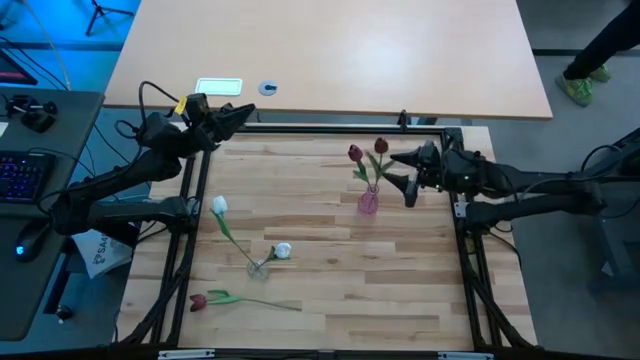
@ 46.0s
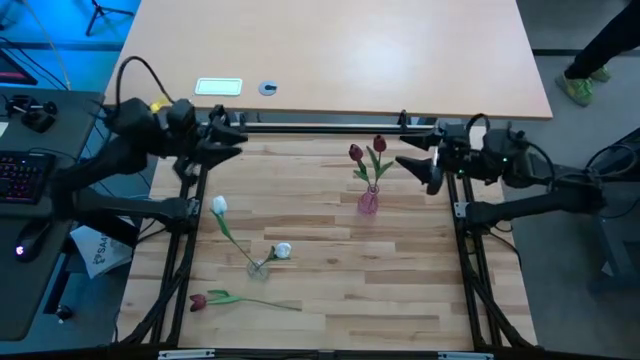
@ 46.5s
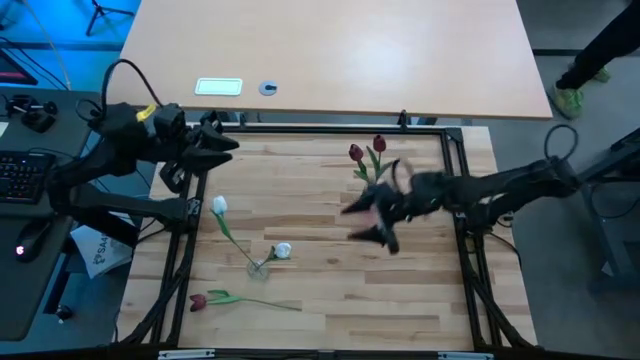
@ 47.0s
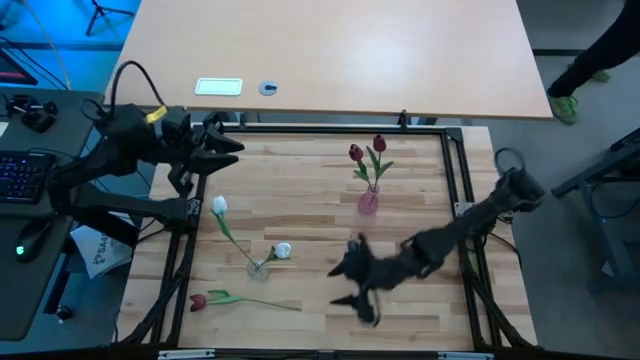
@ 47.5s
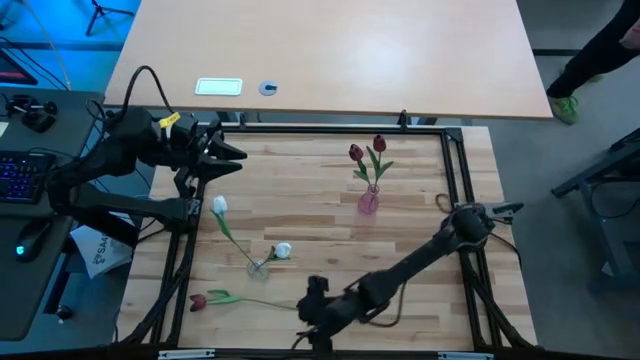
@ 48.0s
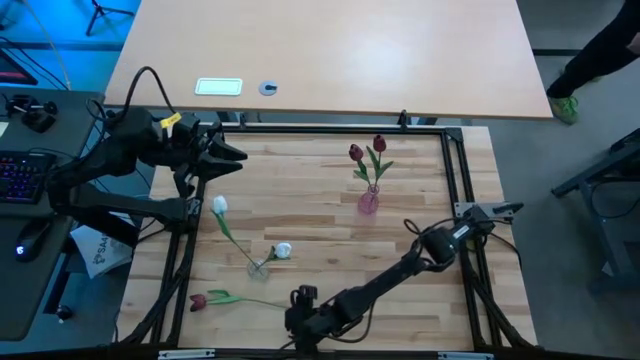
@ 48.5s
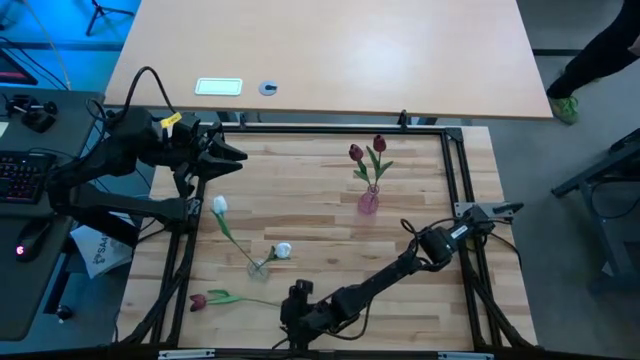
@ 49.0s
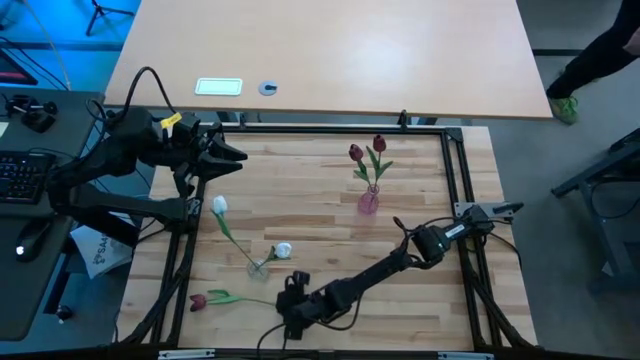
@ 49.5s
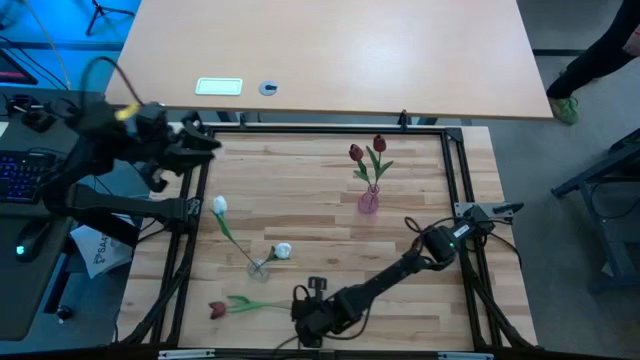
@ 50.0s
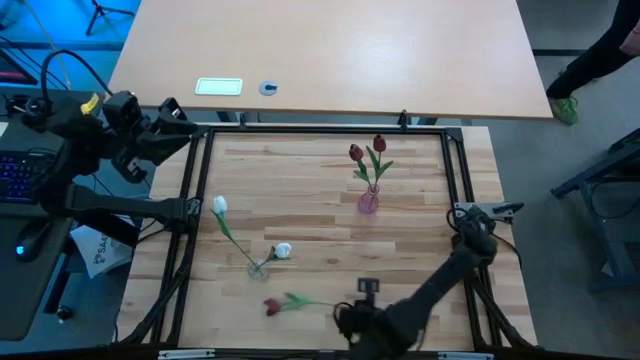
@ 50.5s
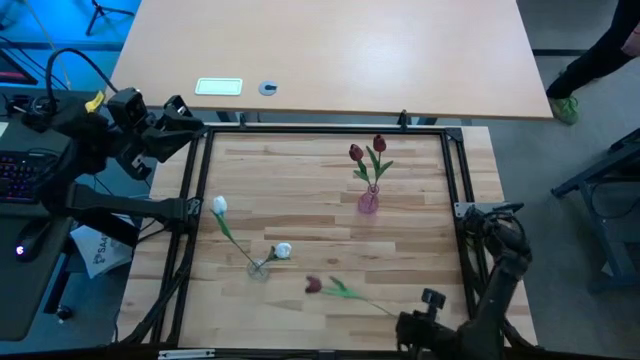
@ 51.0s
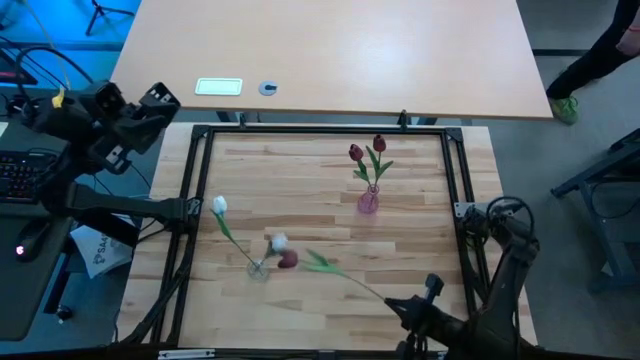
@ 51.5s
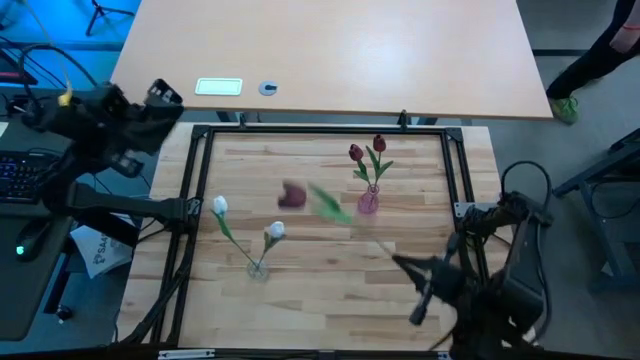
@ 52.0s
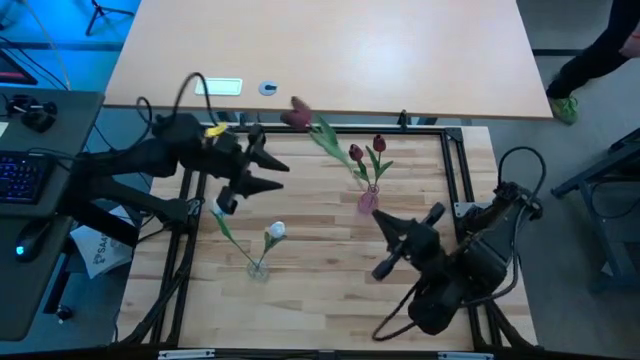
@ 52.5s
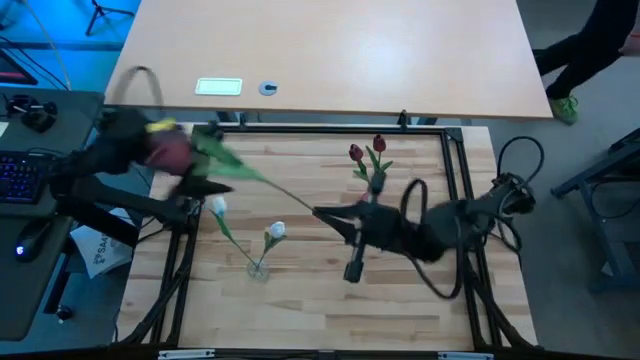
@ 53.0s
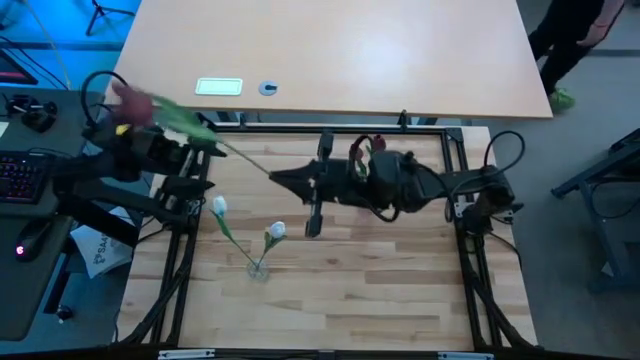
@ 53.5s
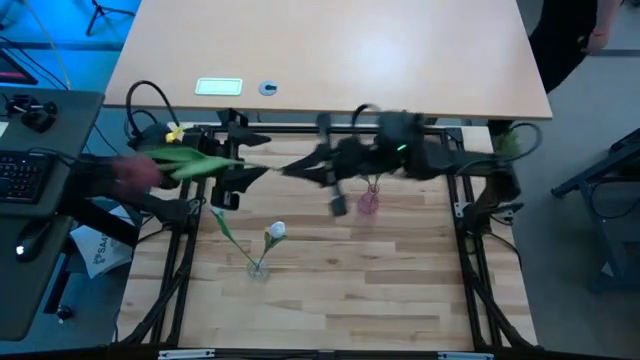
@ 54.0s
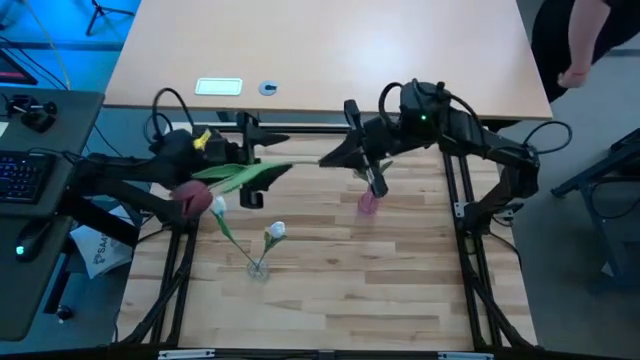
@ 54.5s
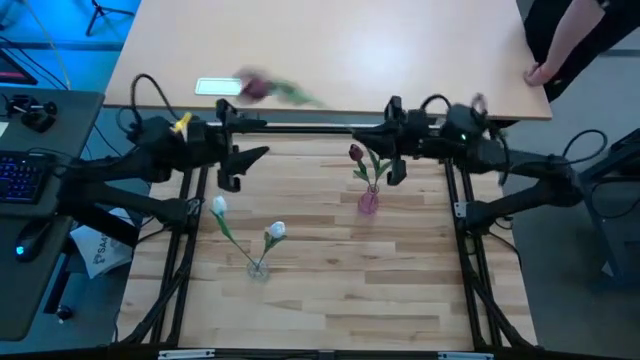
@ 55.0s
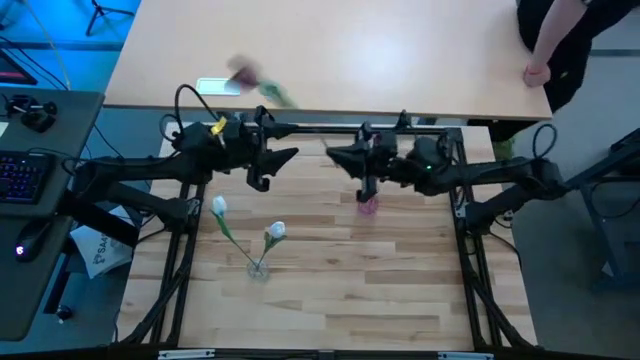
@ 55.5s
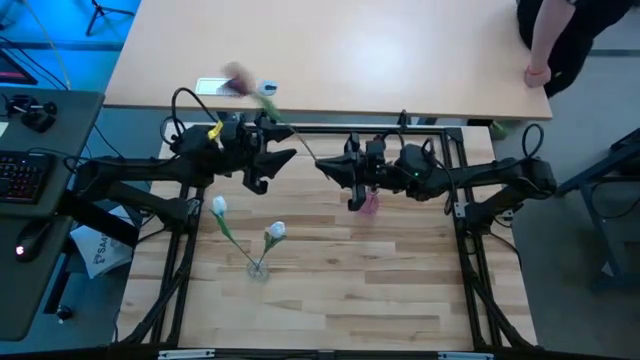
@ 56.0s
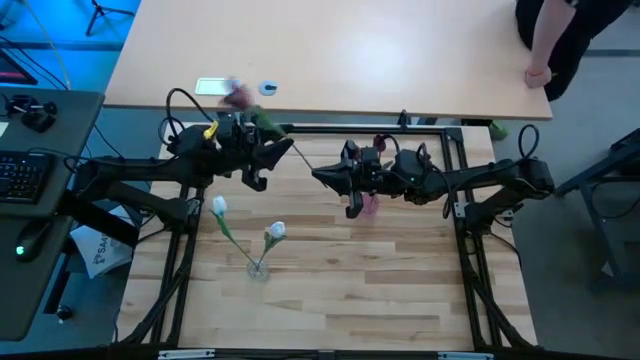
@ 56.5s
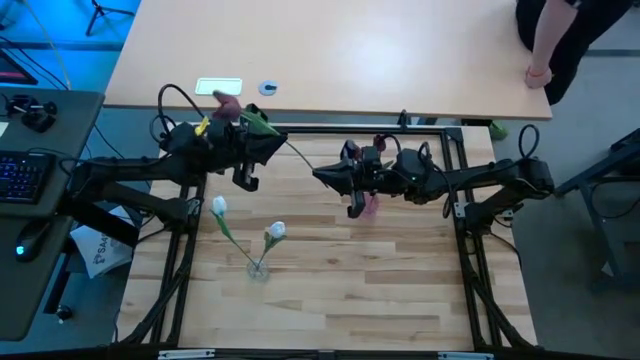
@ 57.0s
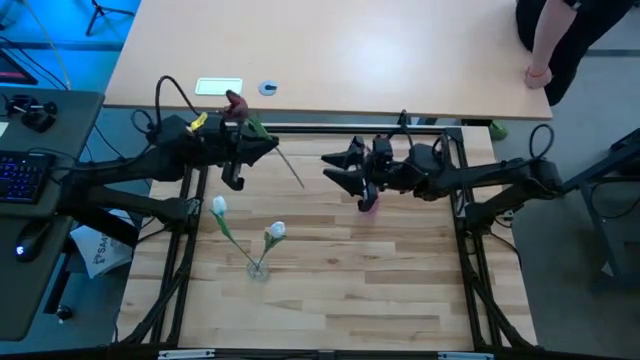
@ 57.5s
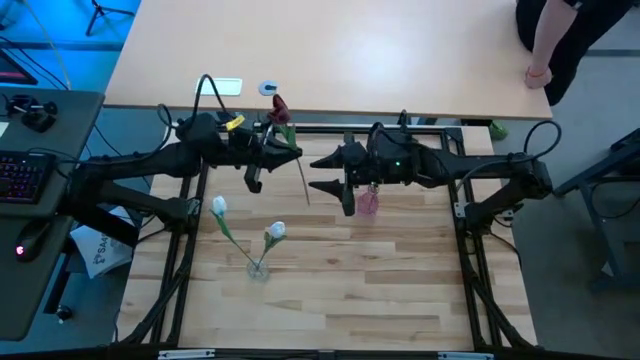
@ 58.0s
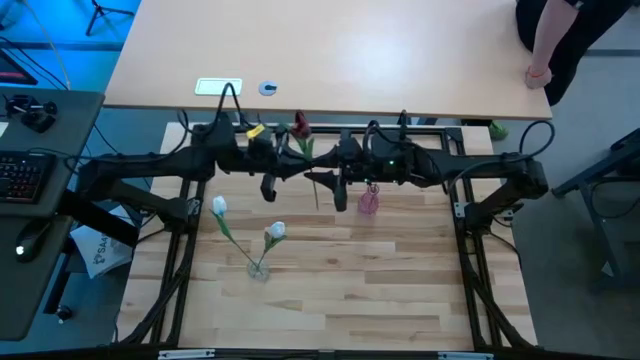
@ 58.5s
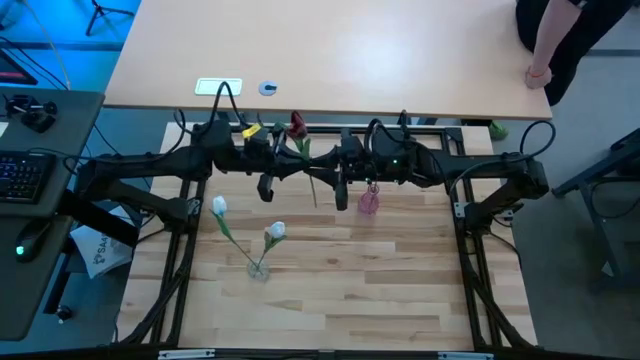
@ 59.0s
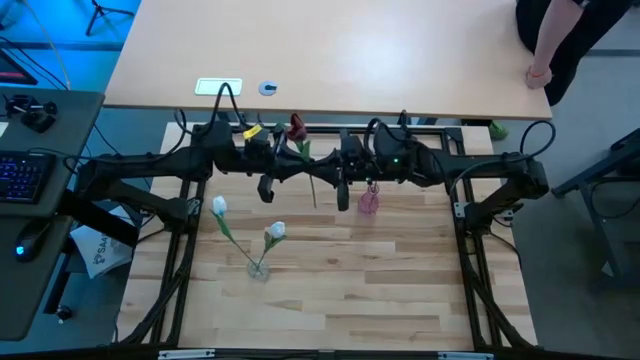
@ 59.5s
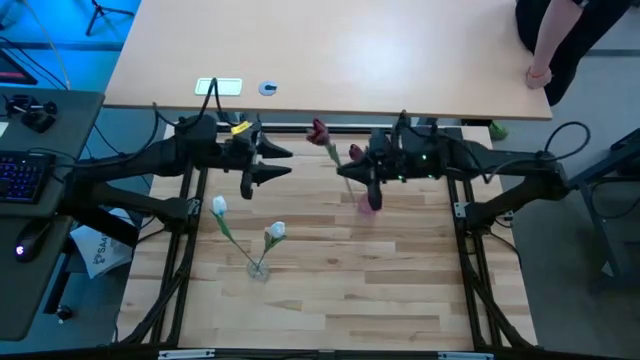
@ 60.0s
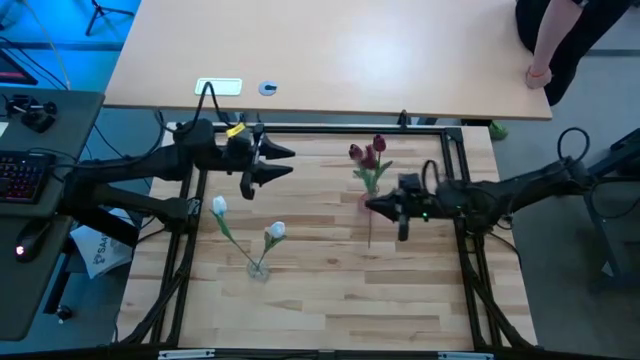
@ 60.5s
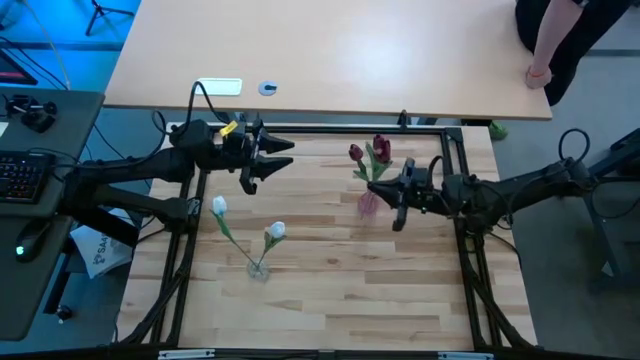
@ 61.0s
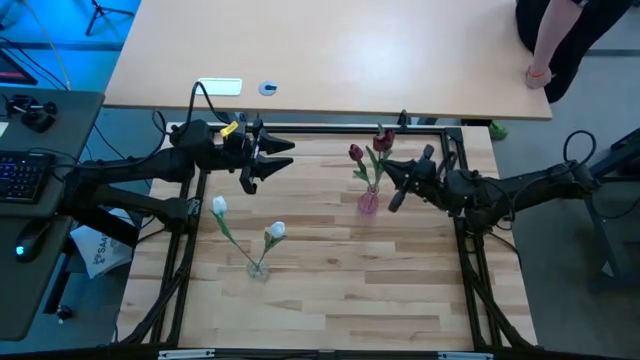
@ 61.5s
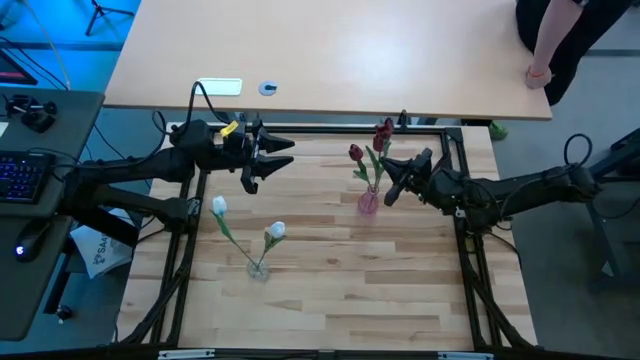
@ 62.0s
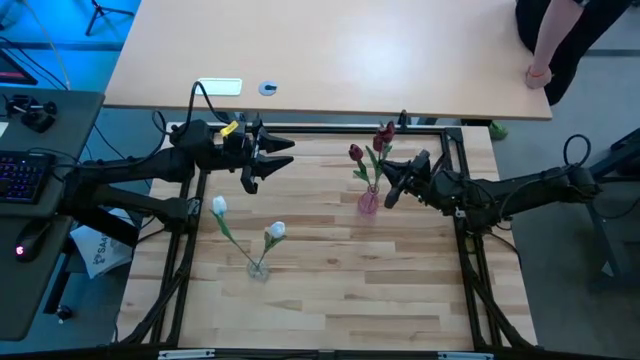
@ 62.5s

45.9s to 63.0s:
Task: Sort flowers into vase by color
Put the red flower into the purple vase

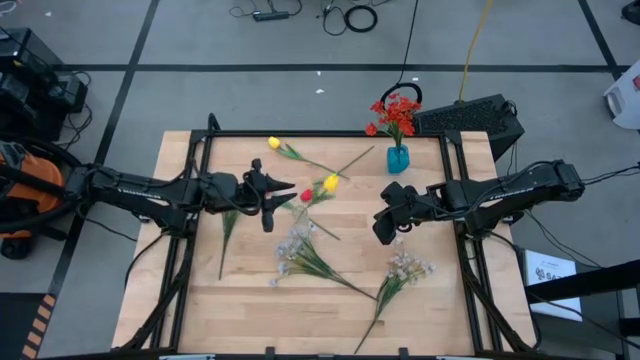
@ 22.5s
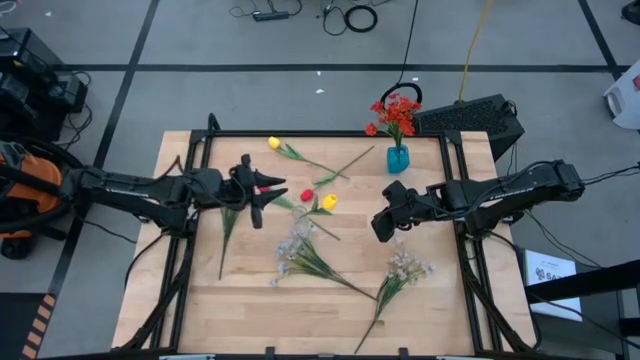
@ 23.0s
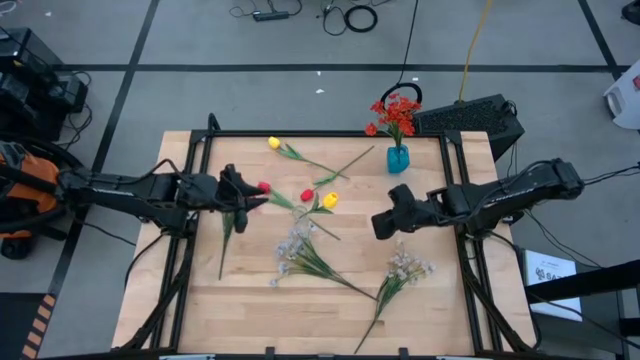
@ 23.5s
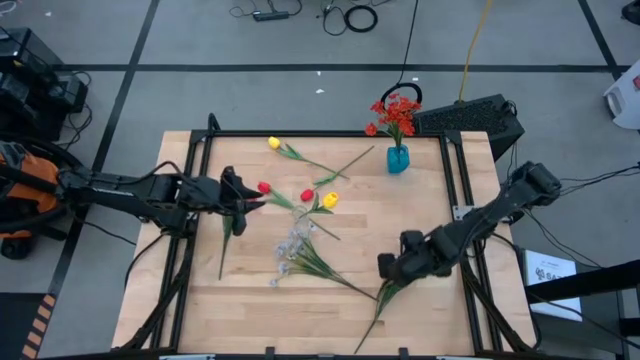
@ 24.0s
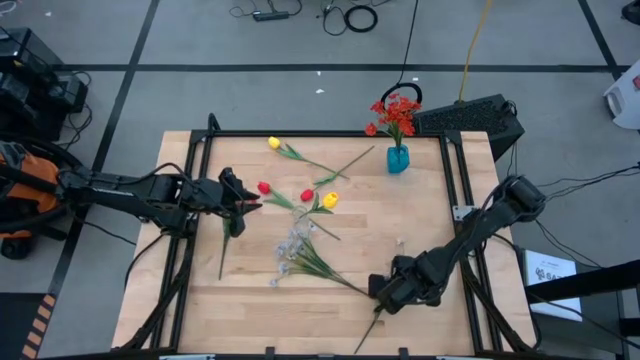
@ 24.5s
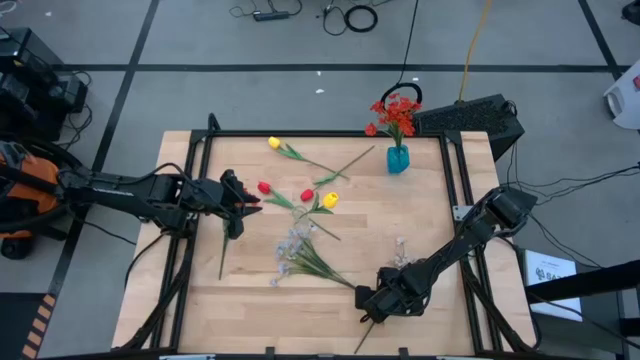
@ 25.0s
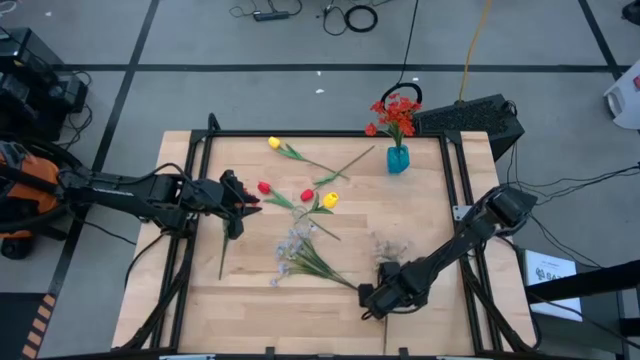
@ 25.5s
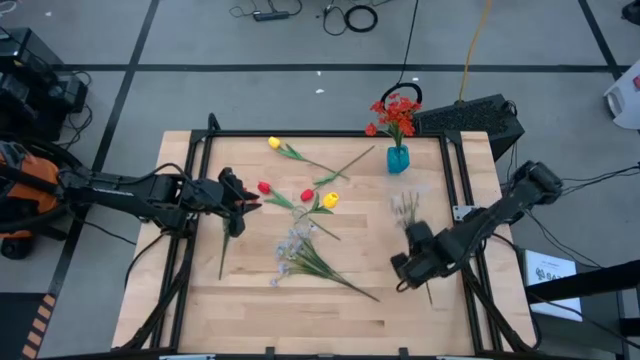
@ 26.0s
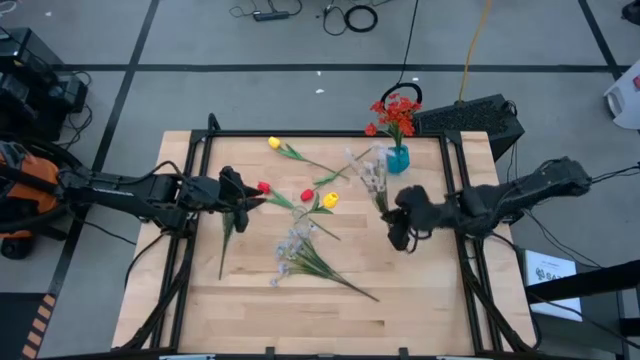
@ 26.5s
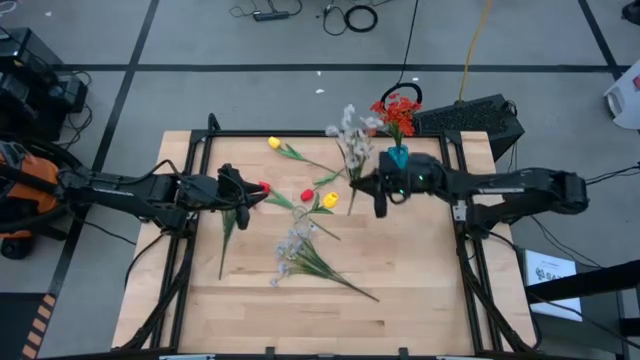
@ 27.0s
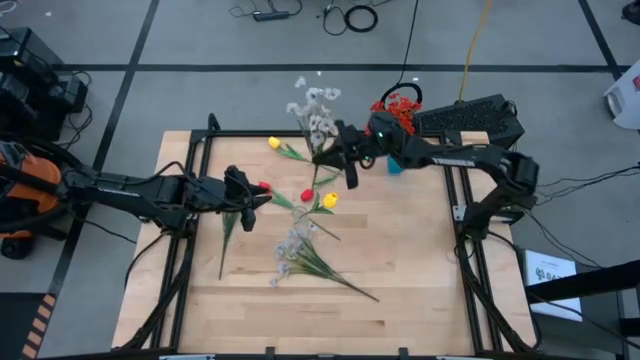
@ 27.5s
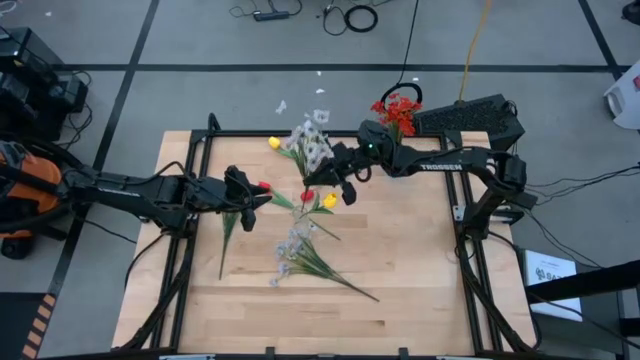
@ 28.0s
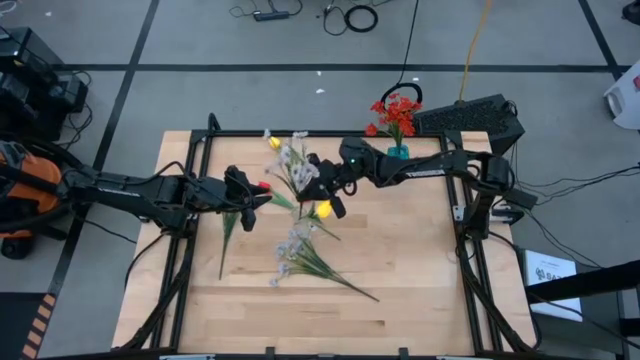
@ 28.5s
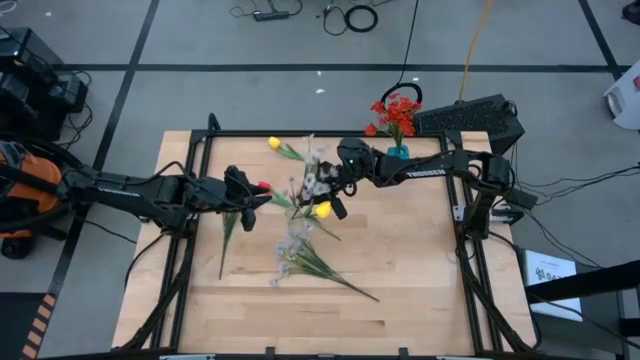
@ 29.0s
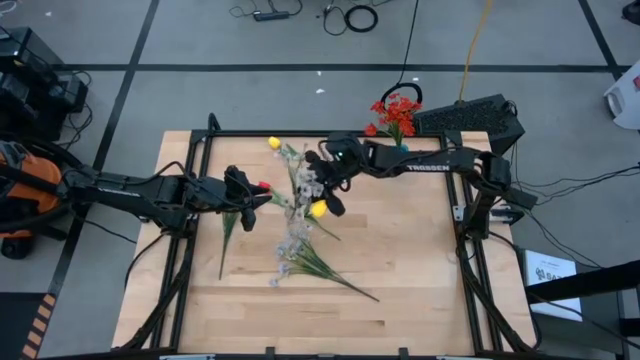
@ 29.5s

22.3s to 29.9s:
Task: Sort flowers into vase by color
Put the right white flowers into the transparent flower vase
